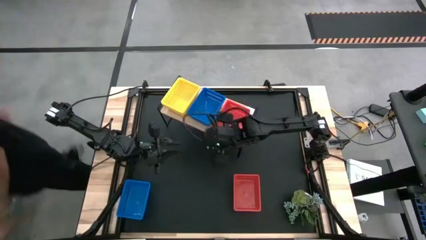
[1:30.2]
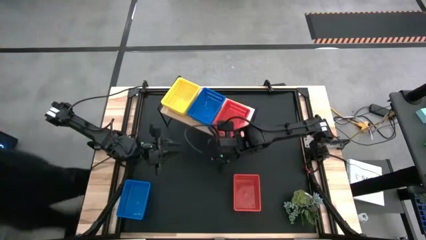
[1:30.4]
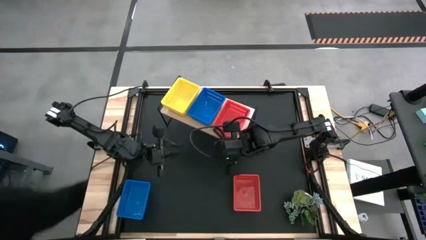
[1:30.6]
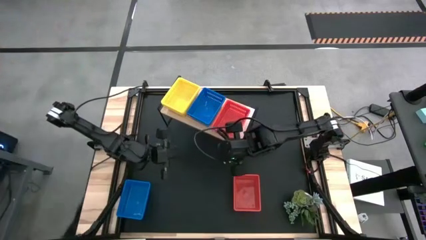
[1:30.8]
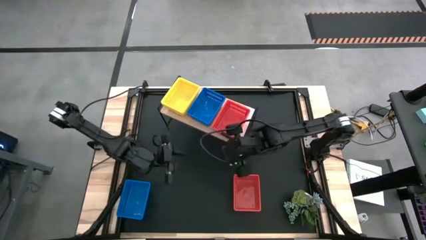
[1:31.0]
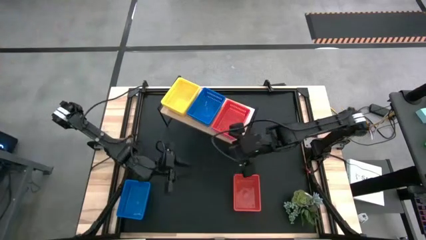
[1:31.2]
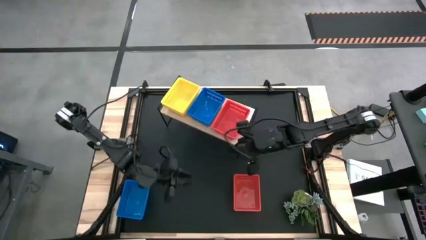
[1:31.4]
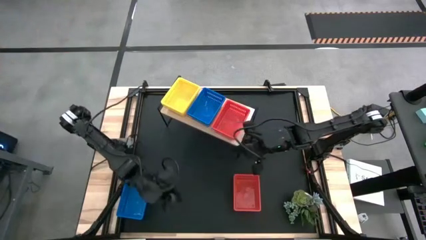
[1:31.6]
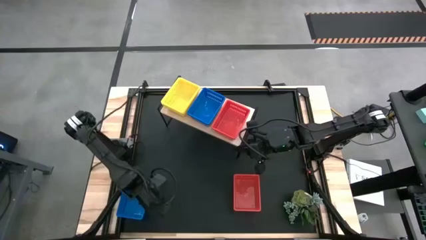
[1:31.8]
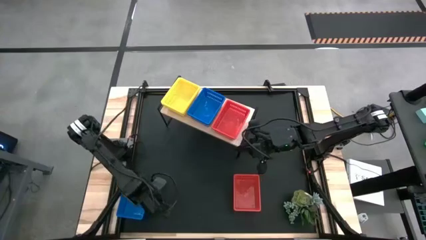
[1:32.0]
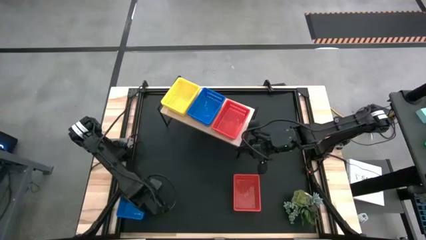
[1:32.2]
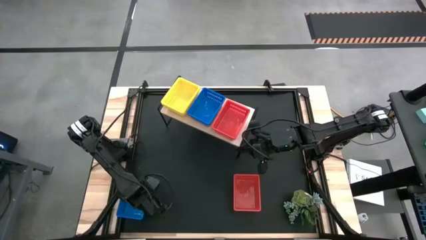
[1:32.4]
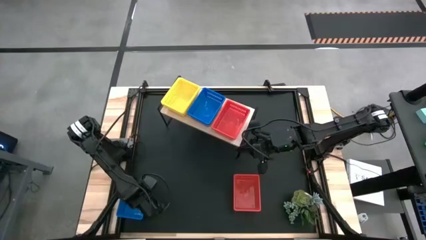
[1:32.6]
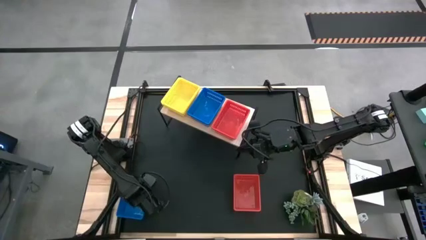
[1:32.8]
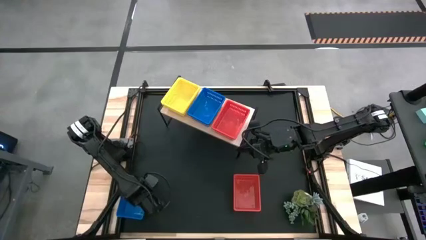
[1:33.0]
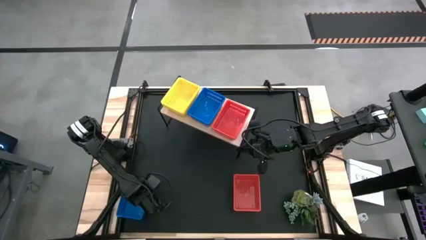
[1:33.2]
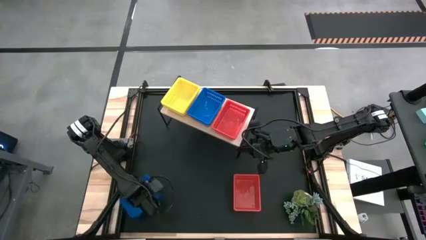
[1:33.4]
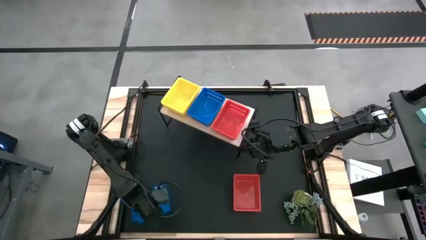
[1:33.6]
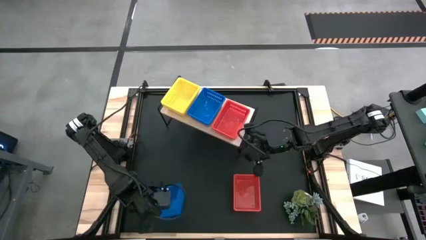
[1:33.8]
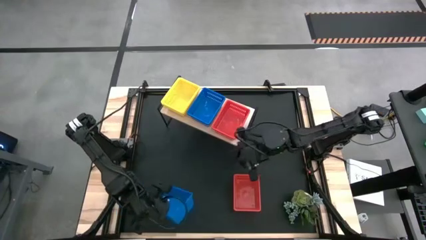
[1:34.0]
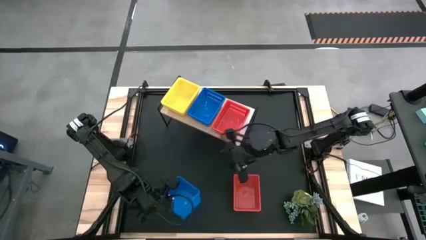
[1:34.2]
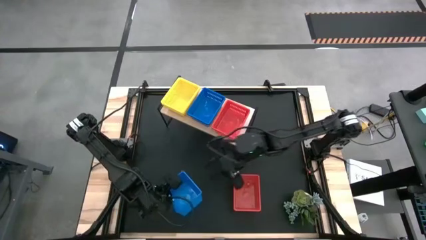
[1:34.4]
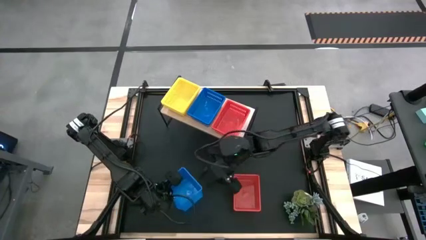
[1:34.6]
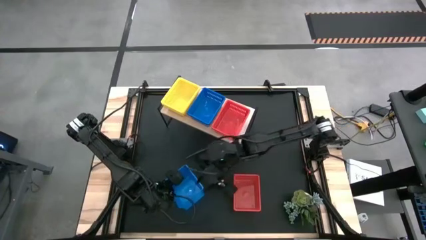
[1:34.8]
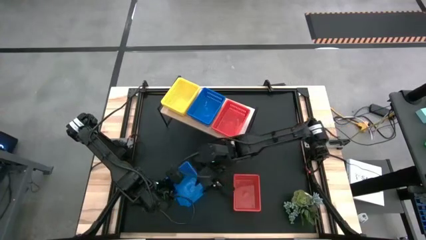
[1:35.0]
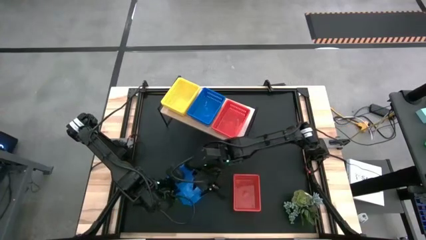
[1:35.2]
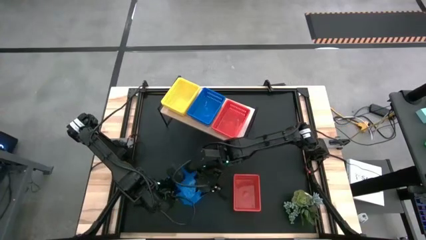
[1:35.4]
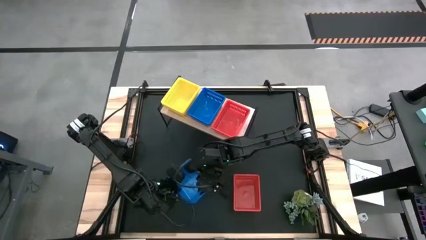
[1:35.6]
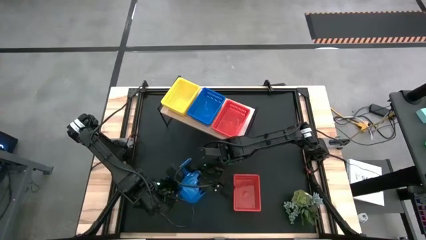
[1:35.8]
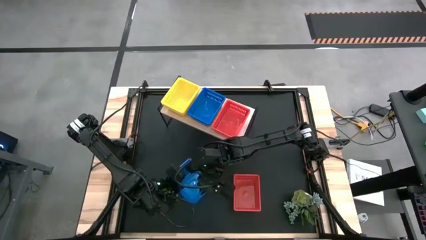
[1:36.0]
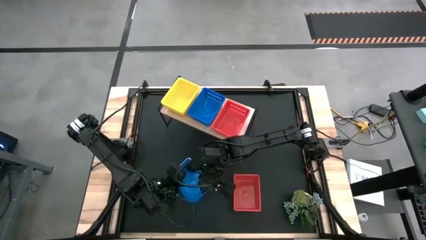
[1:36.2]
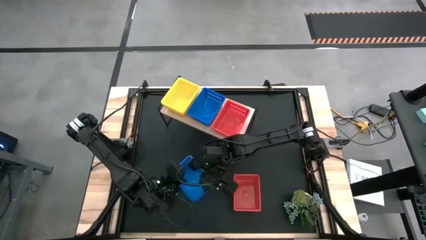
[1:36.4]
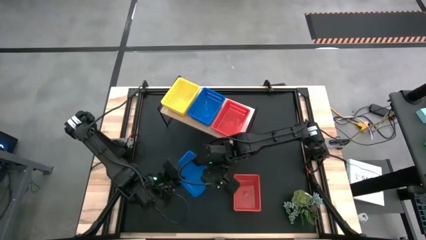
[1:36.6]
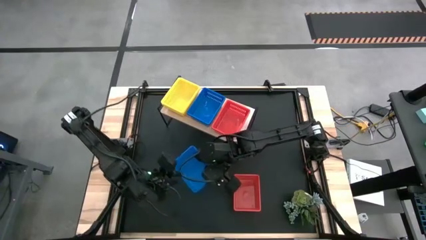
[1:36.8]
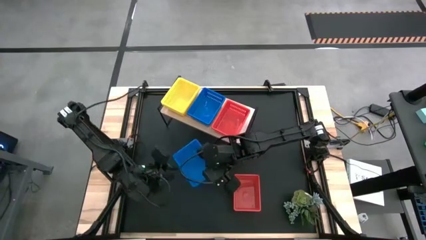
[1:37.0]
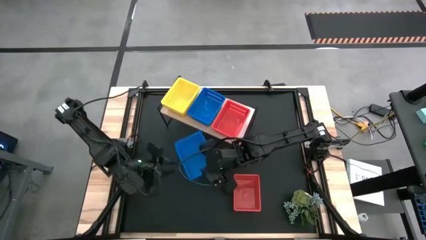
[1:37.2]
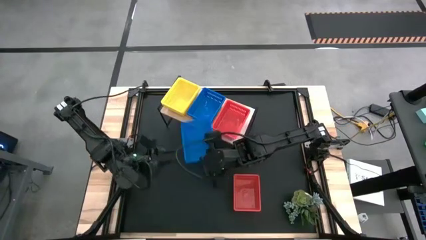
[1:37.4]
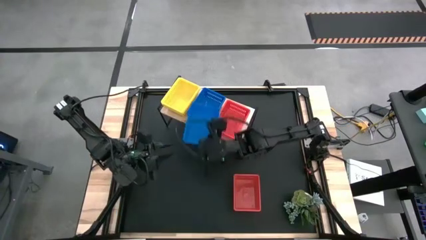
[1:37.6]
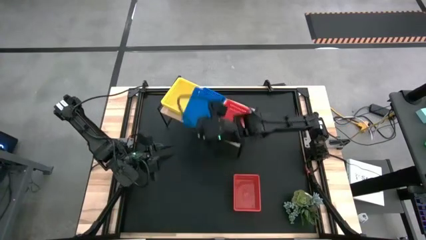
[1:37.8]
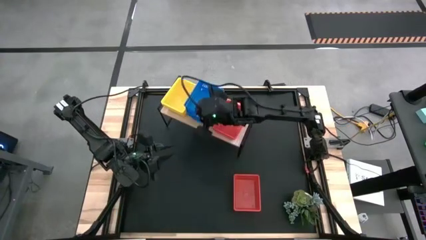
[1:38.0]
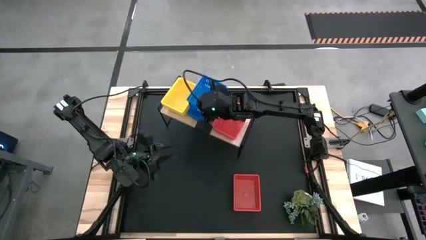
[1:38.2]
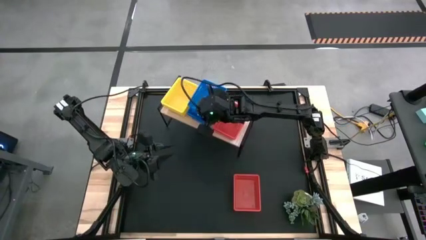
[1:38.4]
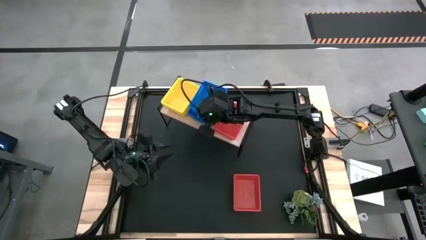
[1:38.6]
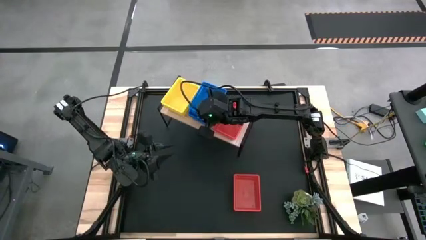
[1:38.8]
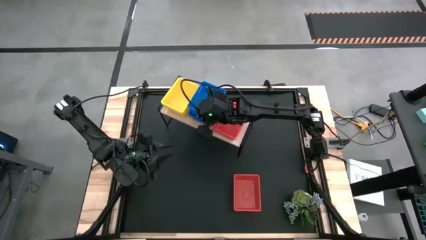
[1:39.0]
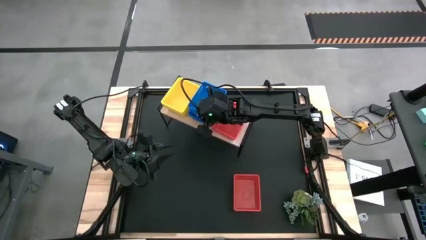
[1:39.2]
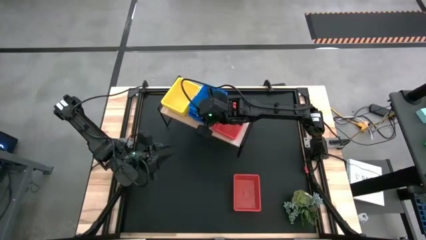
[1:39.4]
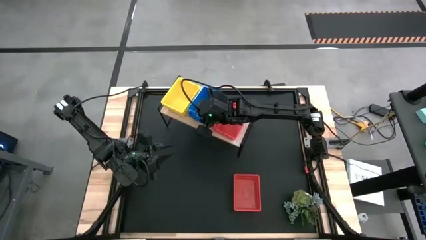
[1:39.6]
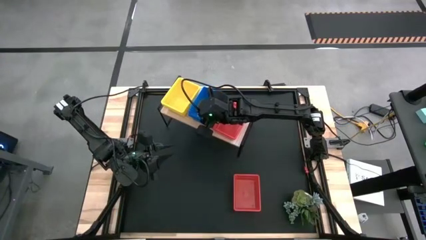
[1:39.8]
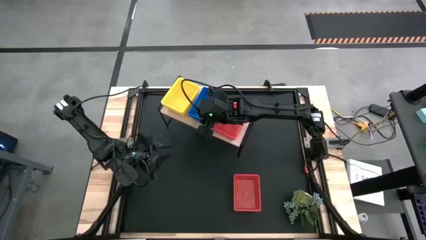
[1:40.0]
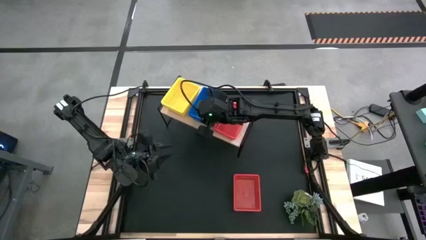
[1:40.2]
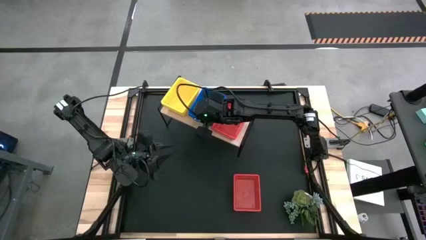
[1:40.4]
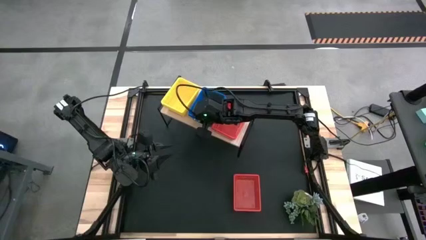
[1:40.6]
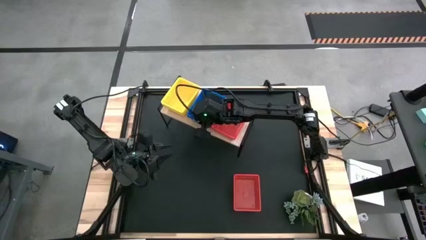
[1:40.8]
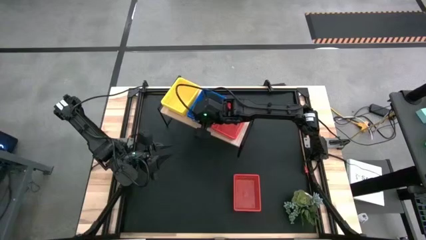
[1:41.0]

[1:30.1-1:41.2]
Task: Stack baskets on shelf by color
Stack the blue bin on top of the blue bin on the shelf

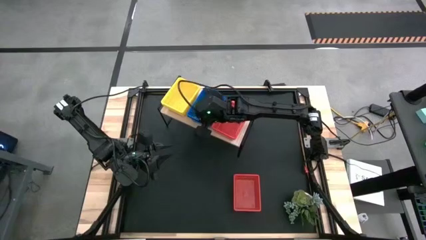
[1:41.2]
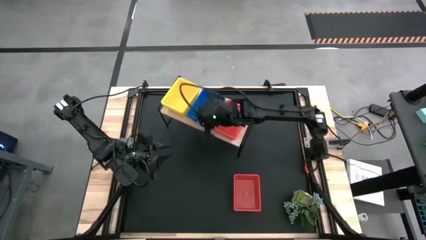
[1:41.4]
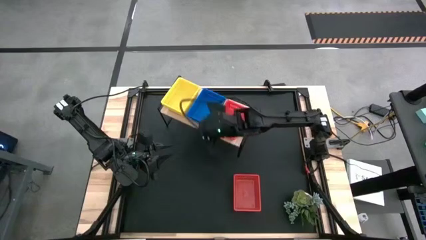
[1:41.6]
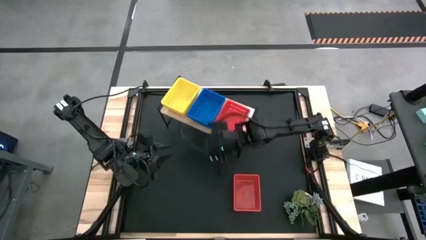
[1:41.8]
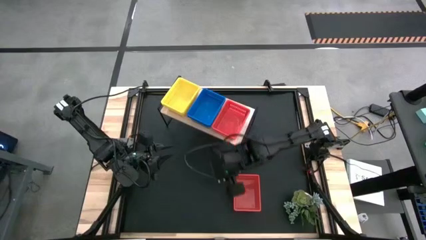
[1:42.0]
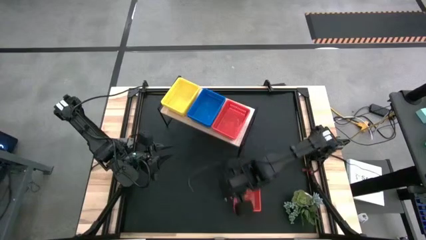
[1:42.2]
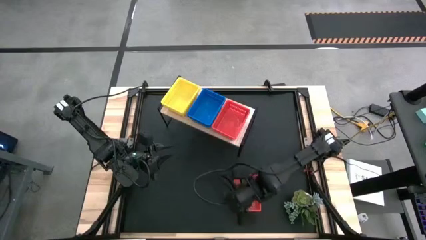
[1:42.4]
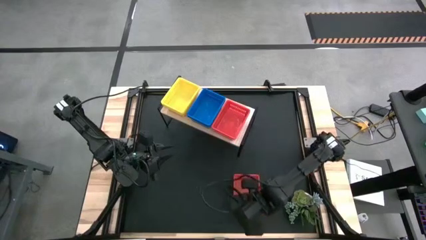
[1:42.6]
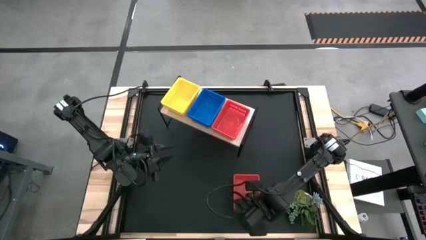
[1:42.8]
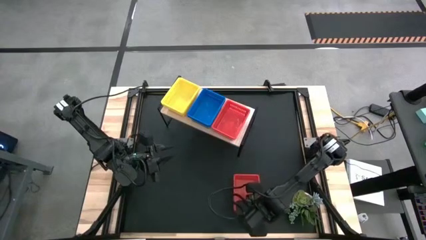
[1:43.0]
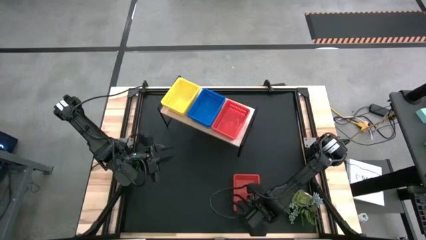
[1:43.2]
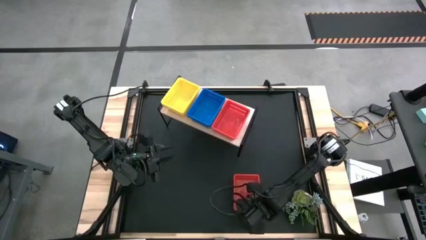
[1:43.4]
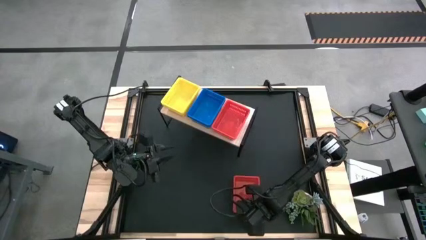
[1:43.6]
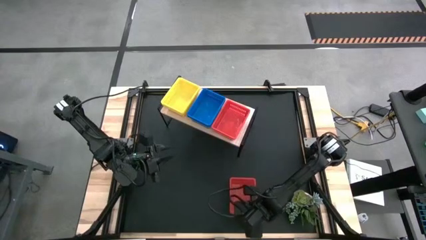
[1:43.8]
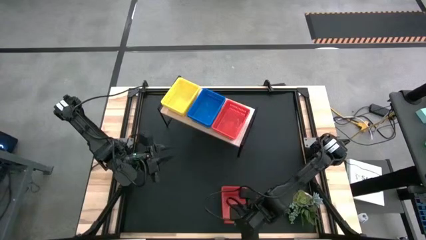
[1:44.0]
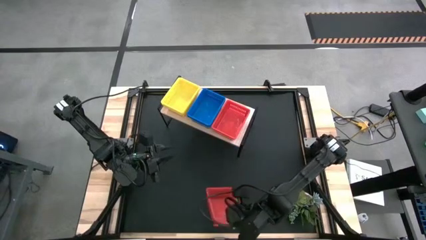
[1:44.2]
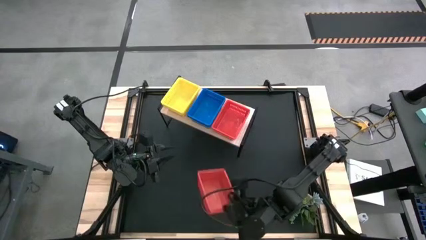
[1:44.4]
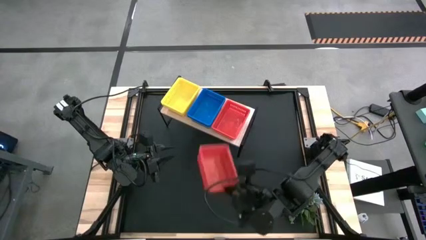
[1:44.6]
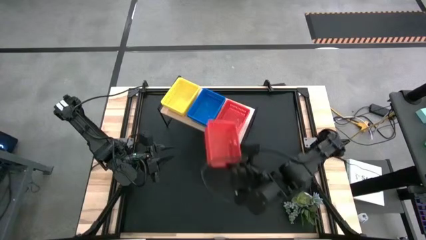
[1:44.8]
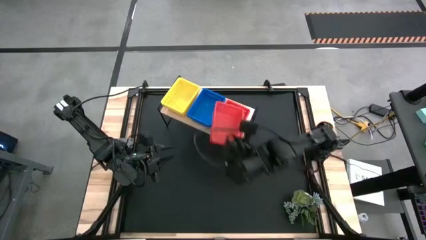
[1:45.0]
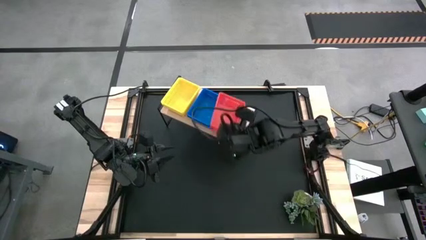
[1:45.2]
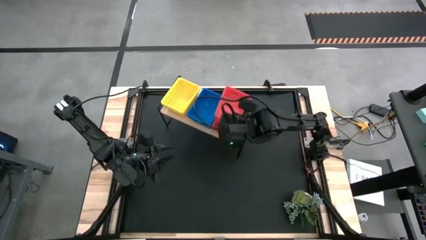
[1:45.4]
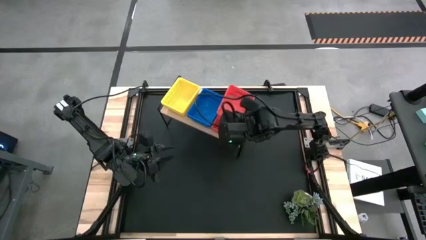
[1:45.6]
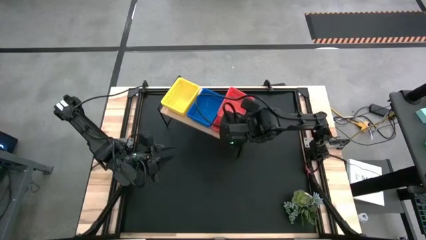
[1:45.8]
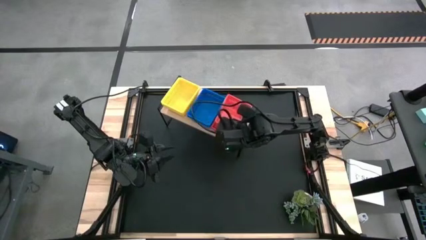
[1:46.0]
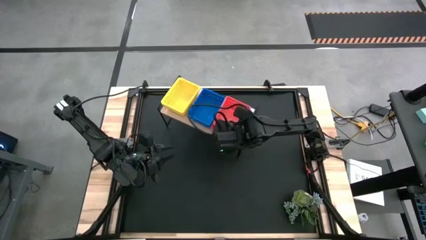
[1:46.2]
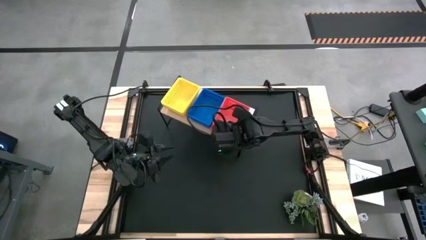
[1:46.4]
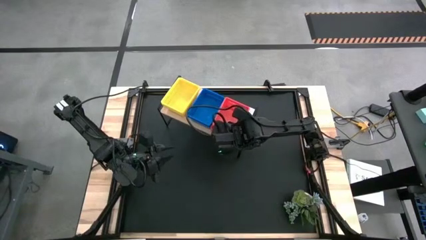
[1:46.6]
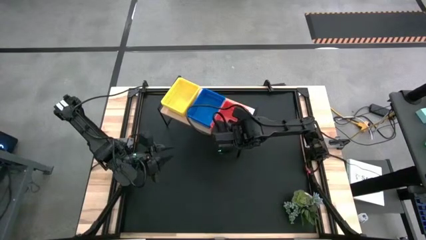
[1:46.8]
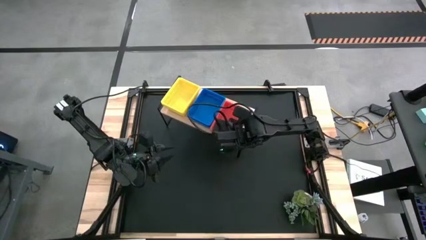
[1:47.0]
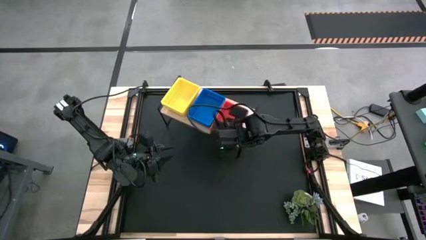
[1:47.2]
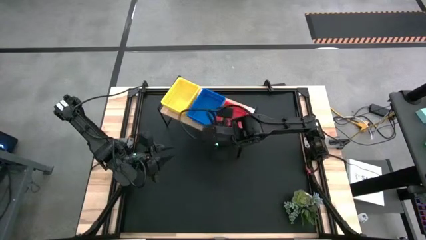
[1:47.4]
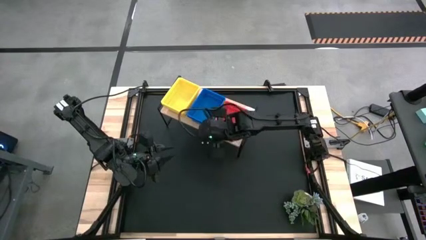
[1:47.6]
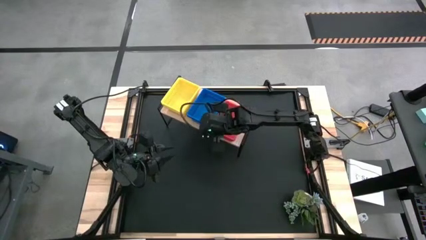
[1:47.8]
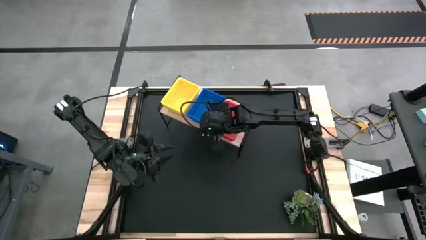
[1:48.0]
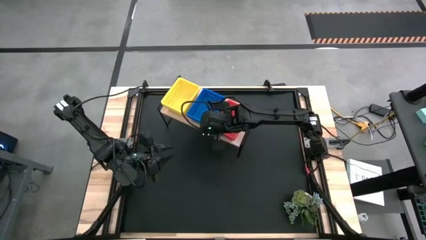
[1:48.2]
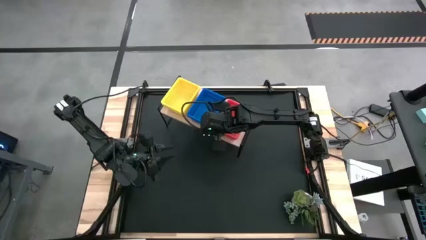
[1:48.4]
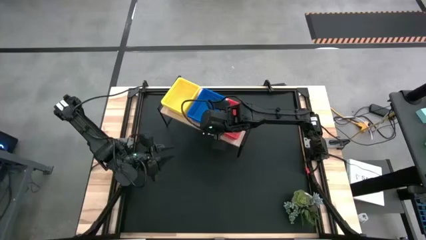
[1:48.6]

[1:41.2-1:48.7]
Stack the red bin on top of the red bin on the shelf
